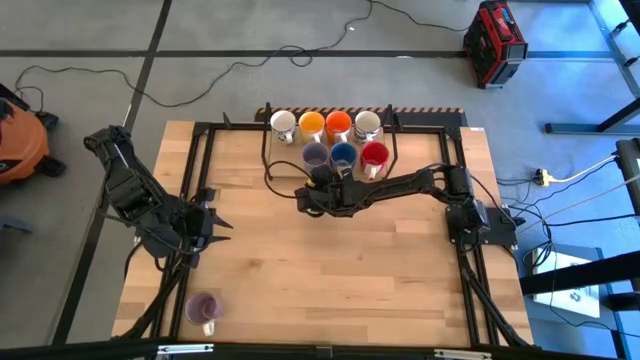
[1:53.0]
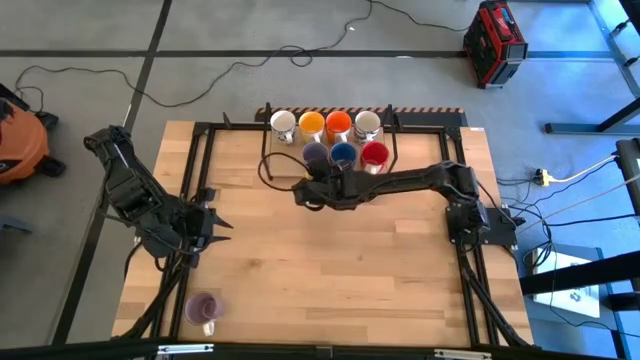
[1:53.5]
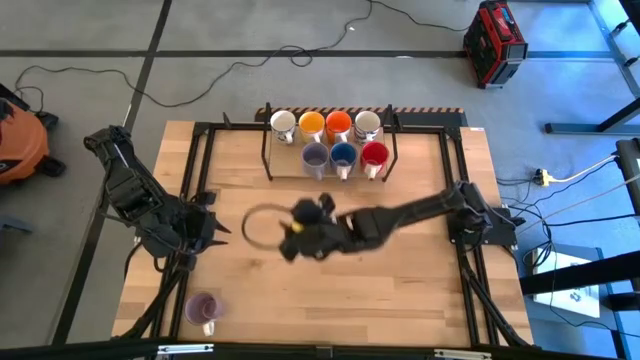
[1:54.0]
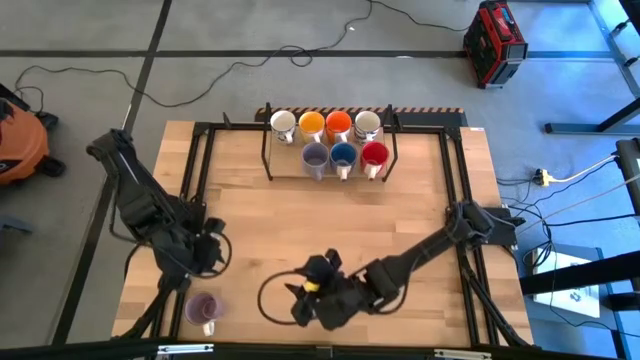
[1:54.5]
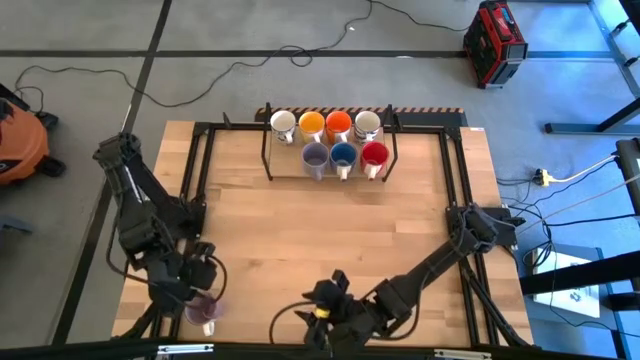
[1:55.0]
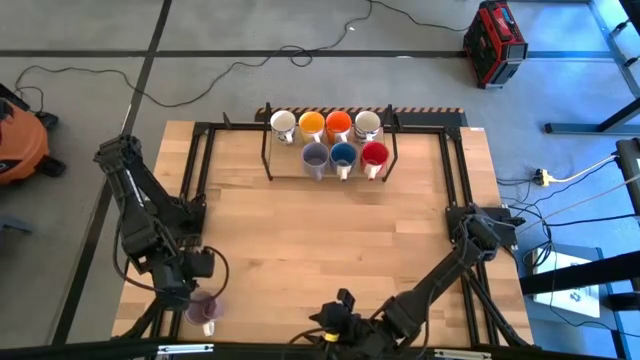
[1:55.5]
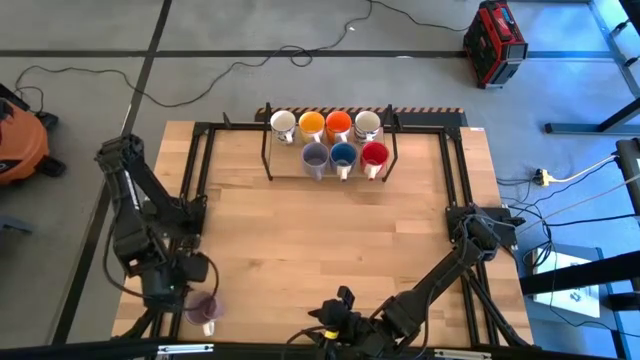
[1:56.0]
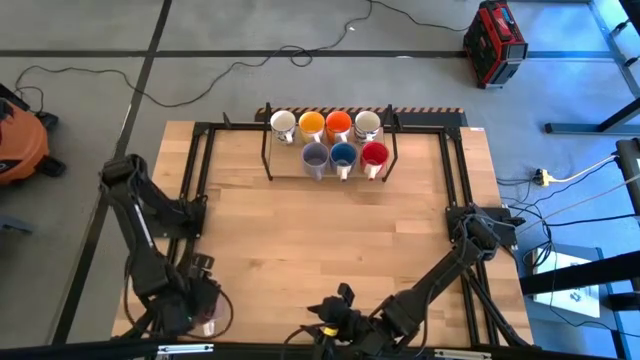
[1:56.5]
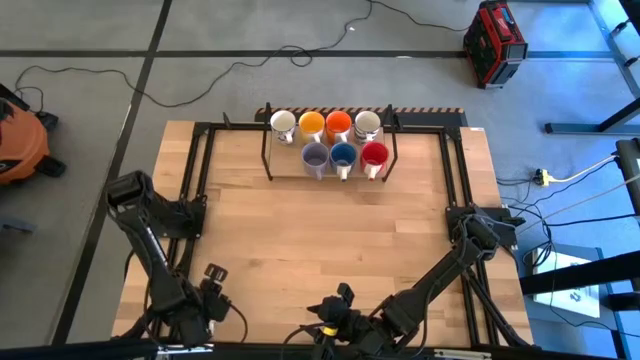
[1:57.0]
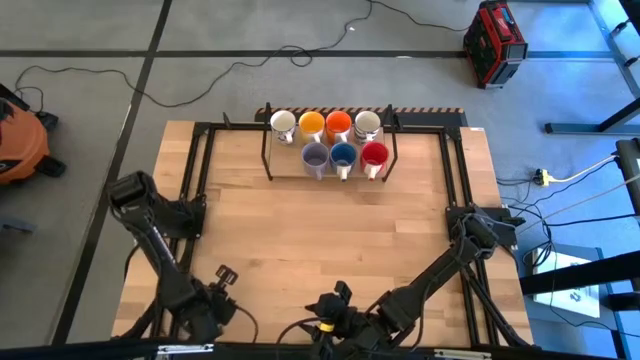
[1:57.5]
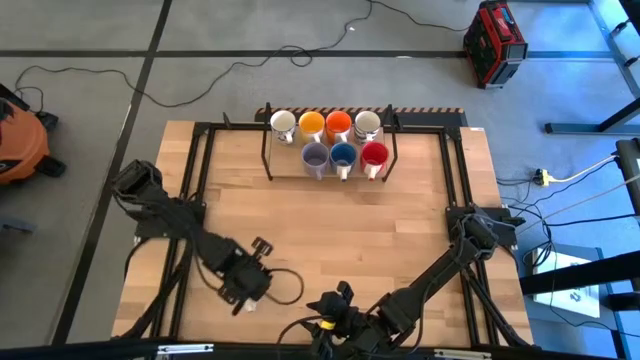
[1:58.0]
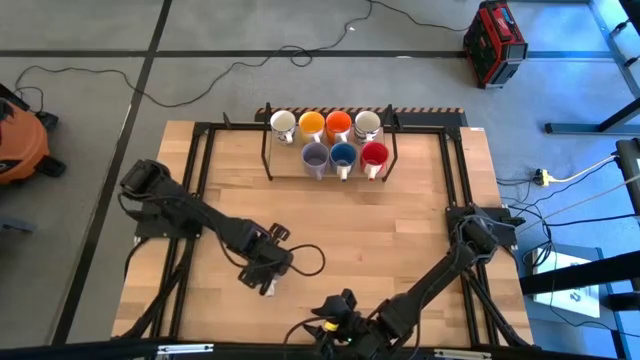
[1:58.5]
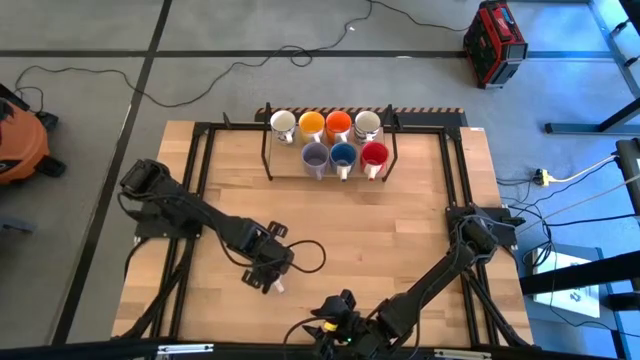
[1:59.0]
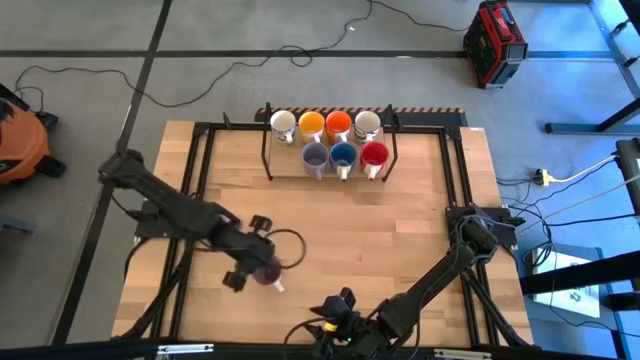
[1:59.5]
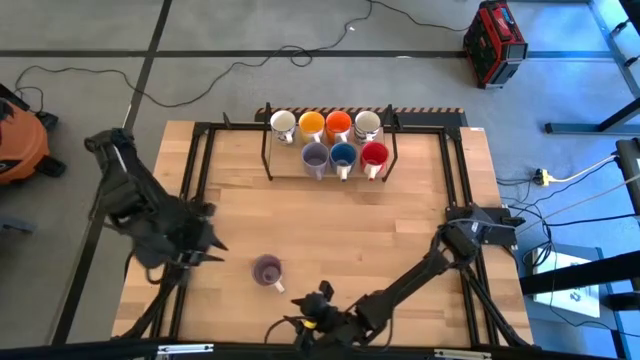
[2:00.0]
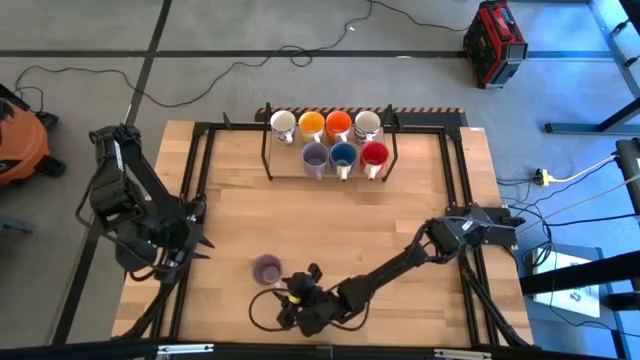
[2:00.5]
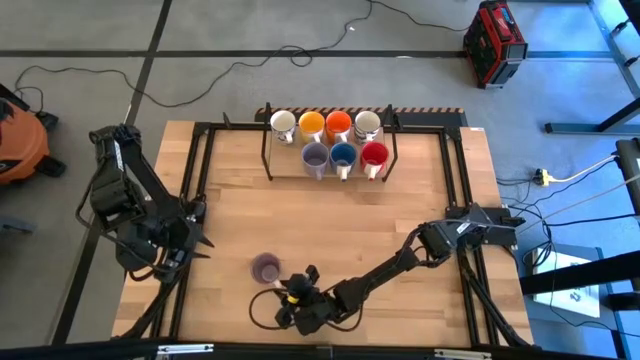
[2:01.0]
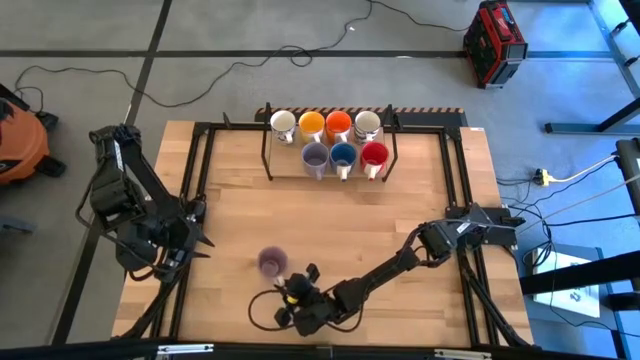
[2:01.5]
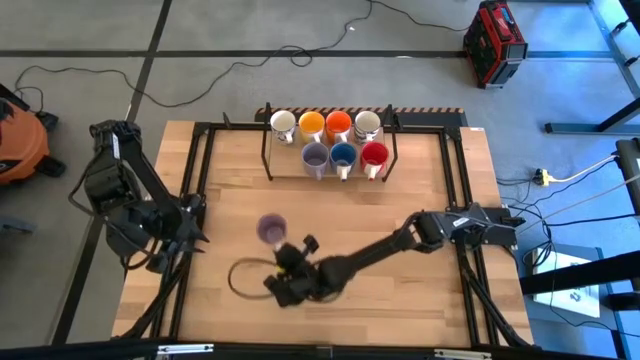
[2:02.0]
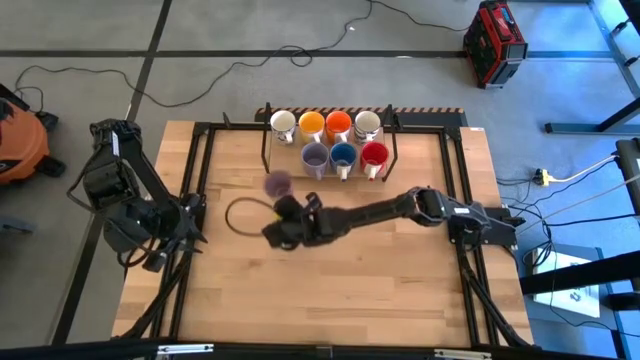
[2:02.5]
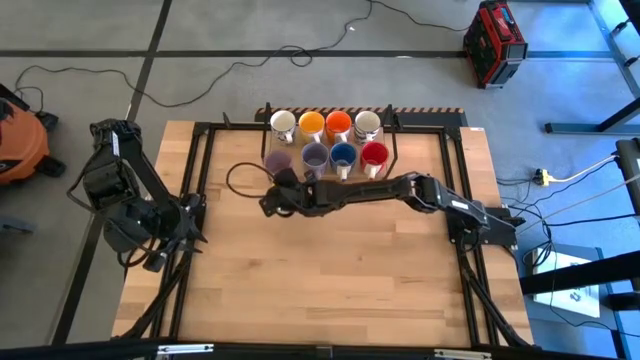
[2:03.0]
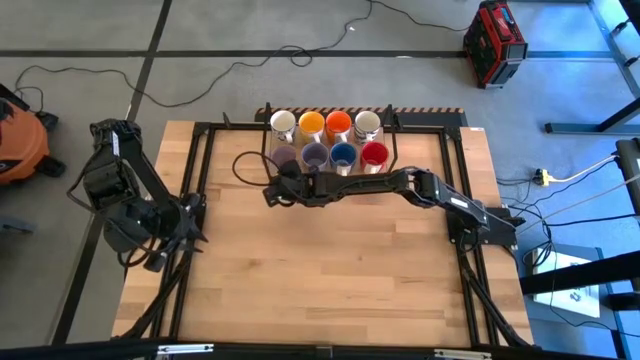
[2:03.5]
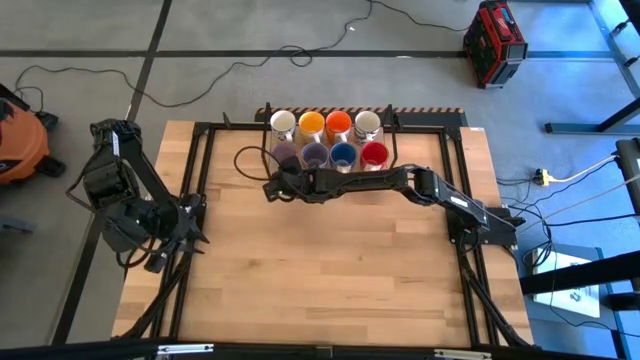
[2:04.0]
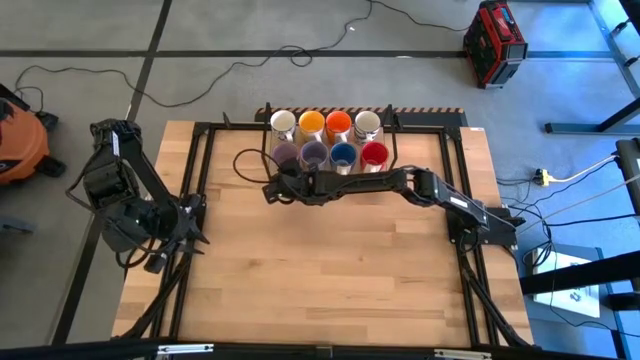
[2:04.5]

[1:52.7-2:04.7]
Task: Place coffee mugs
Put the purple mug on the shelf

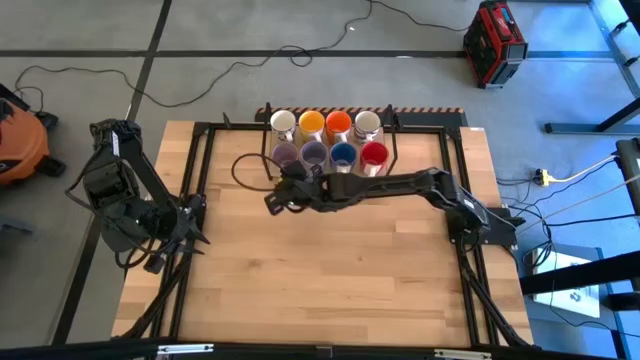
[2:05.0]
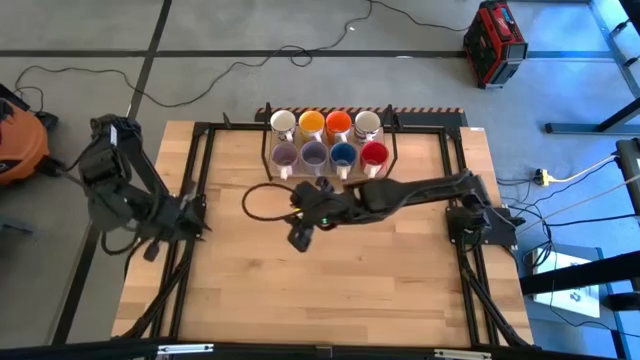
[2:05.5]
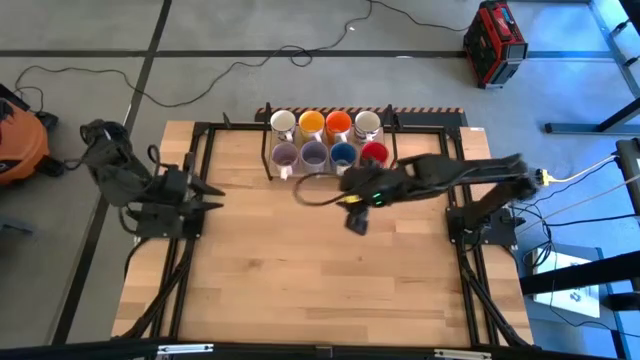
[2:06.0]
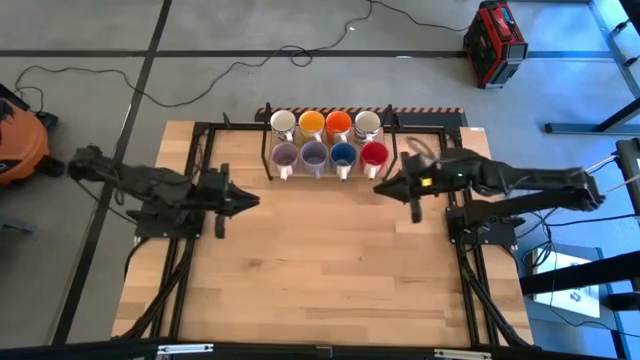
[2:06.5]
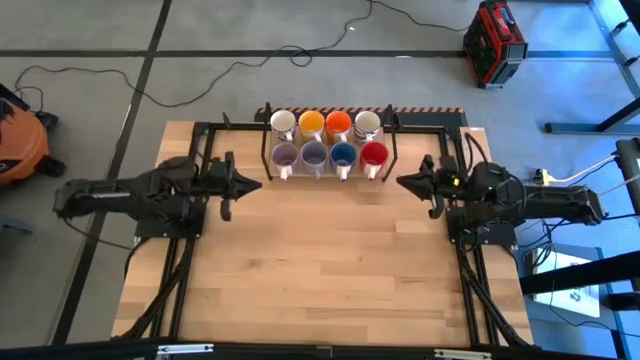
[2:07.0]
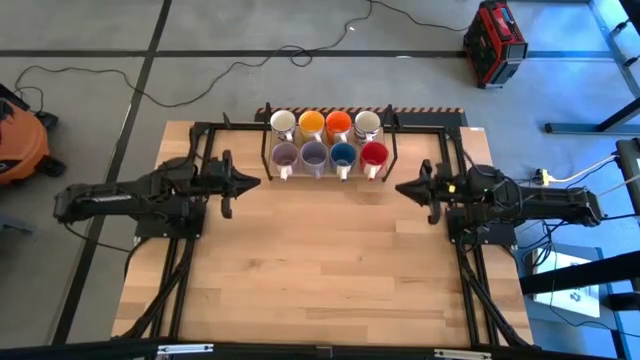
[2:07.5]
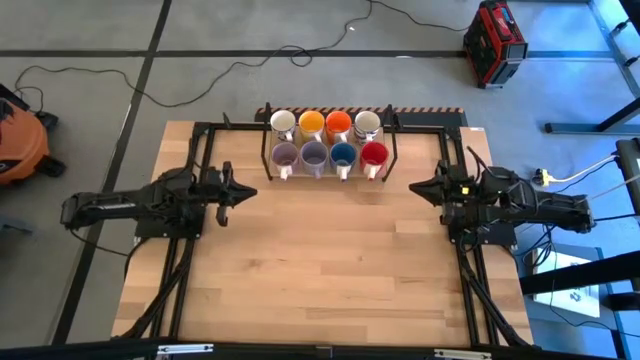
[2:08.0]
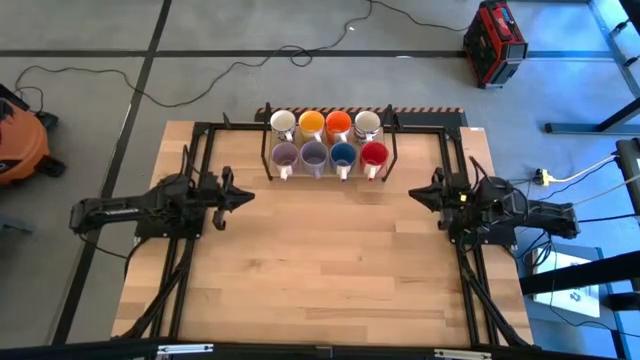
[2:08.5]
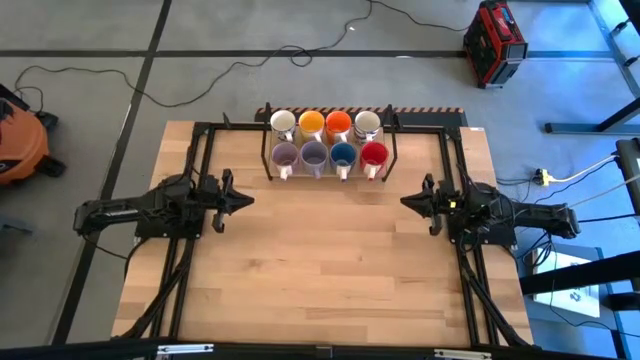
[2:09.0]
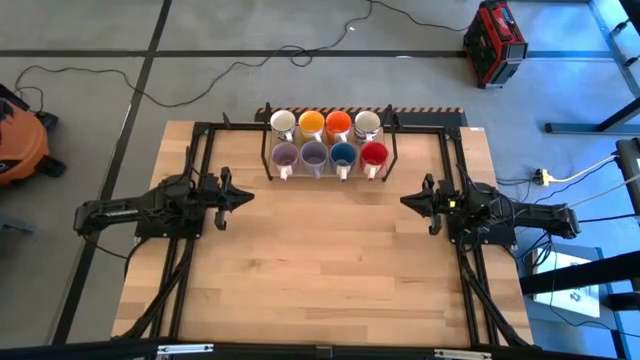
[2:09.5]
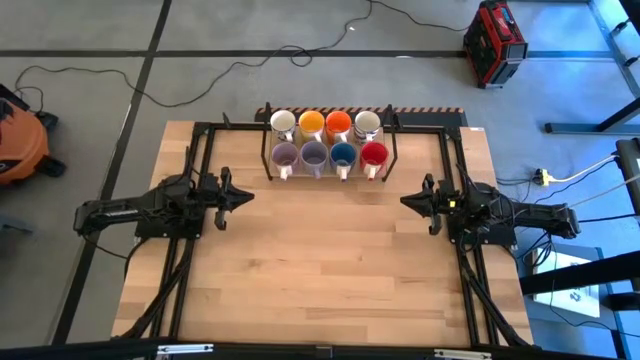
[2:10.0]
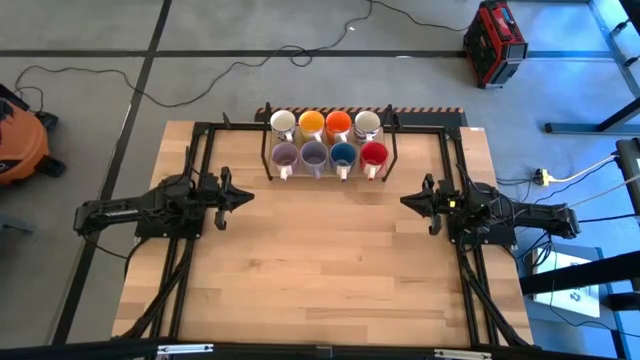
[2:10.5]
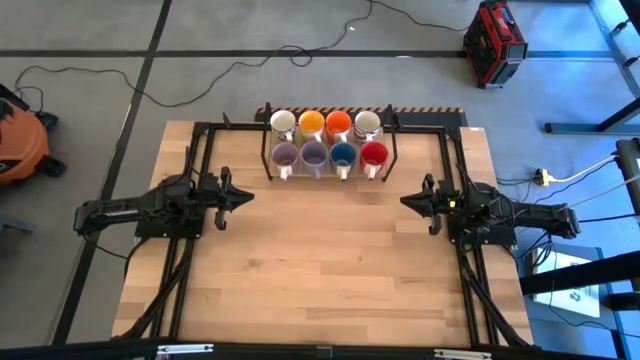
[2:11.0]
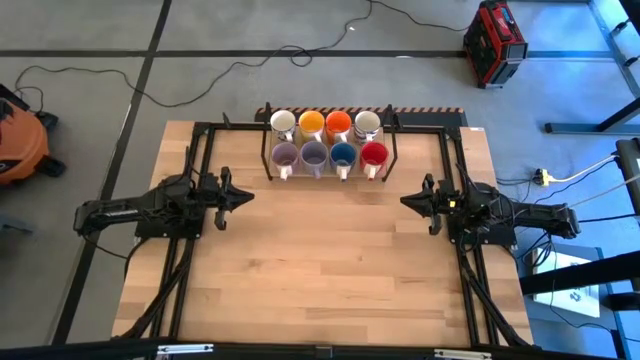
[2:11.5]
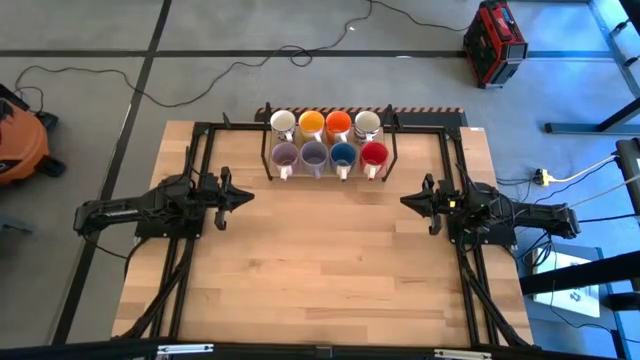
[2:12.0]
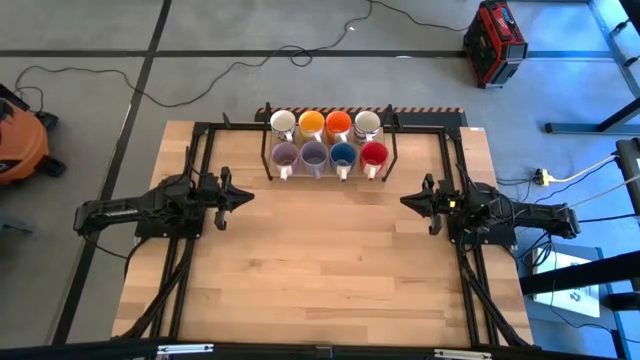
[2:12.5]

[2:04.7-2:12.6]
Return to Home Position
